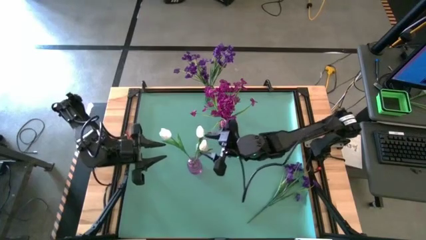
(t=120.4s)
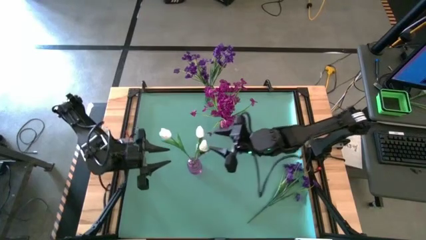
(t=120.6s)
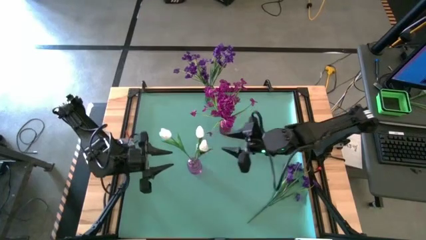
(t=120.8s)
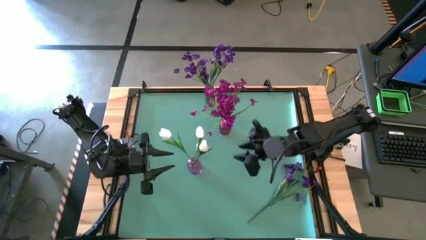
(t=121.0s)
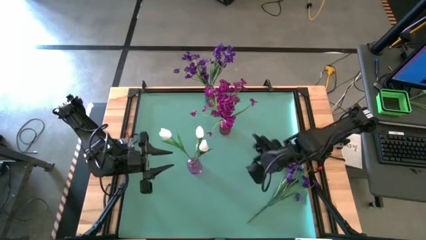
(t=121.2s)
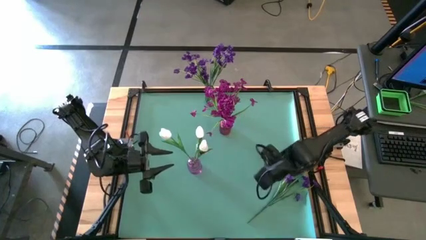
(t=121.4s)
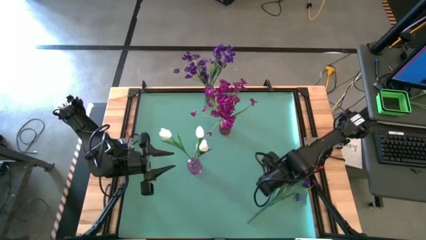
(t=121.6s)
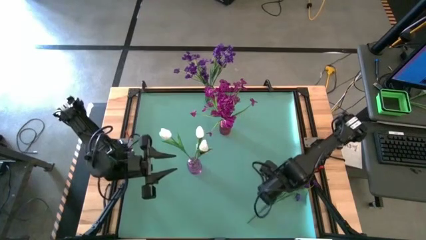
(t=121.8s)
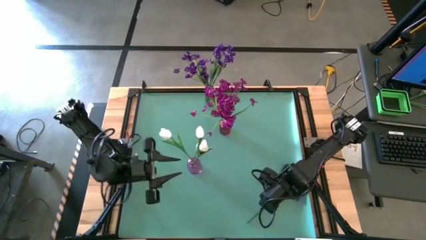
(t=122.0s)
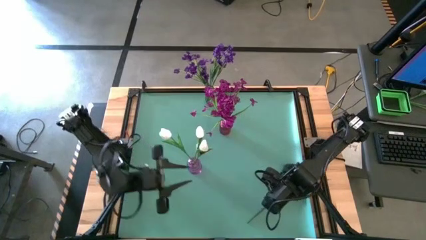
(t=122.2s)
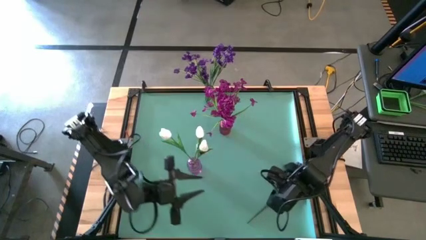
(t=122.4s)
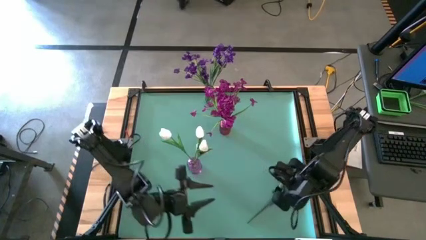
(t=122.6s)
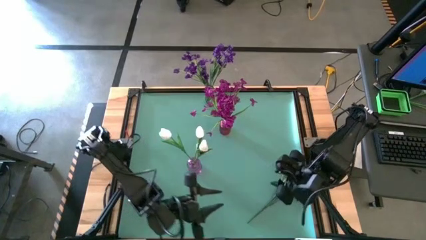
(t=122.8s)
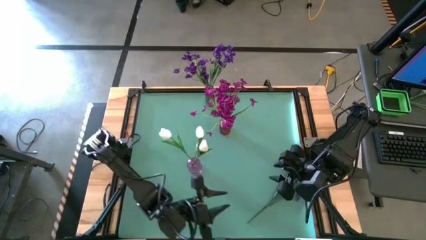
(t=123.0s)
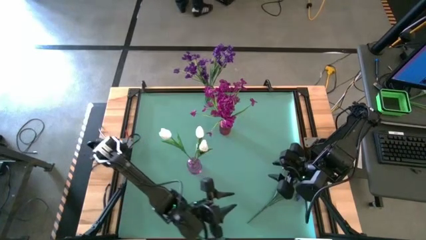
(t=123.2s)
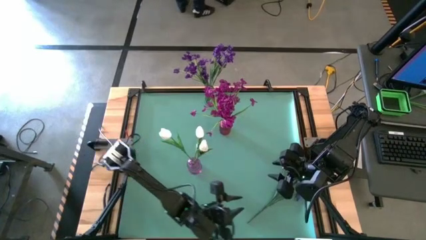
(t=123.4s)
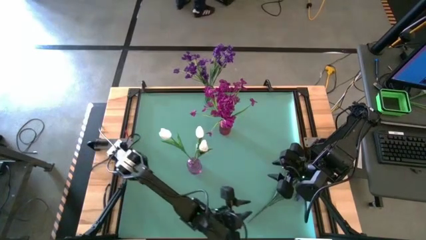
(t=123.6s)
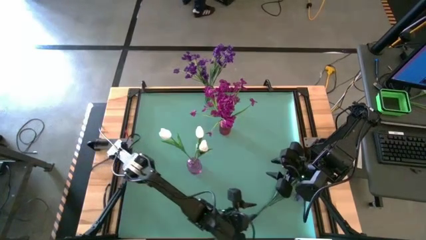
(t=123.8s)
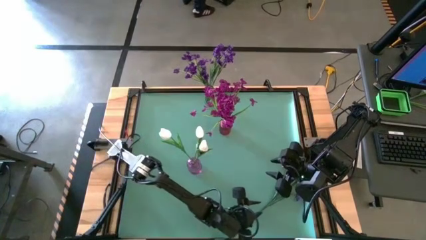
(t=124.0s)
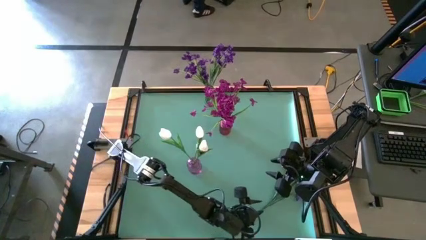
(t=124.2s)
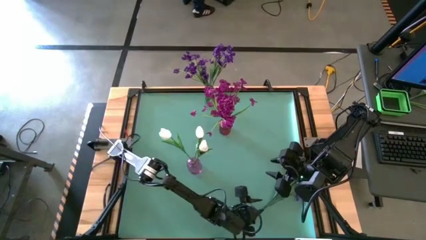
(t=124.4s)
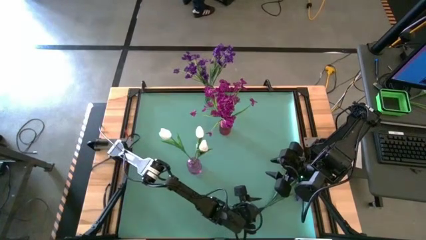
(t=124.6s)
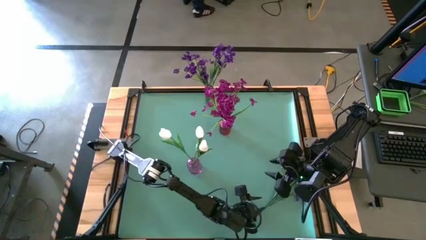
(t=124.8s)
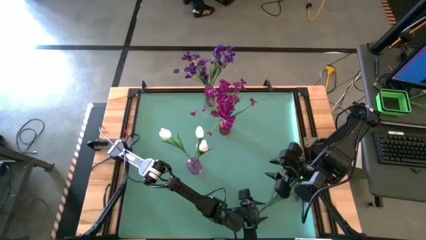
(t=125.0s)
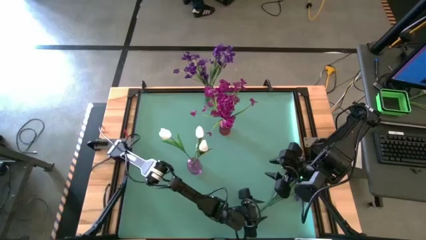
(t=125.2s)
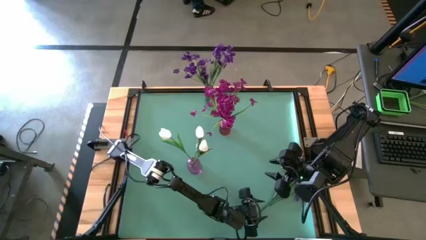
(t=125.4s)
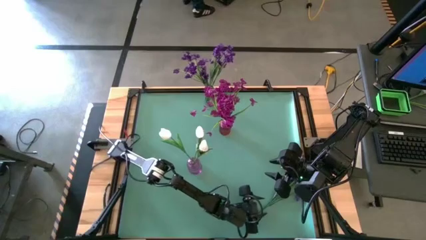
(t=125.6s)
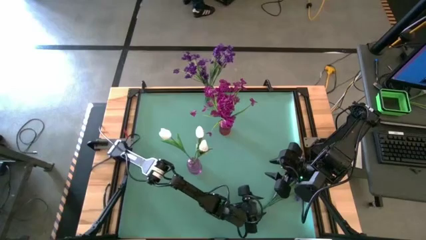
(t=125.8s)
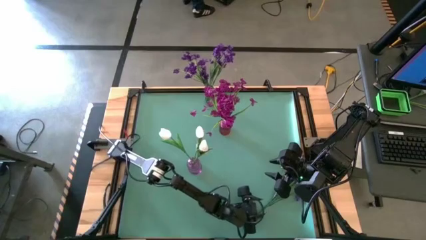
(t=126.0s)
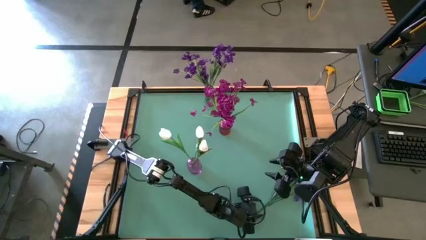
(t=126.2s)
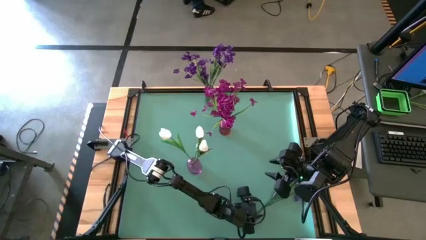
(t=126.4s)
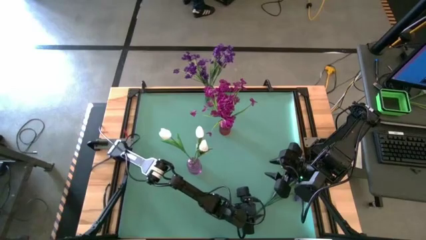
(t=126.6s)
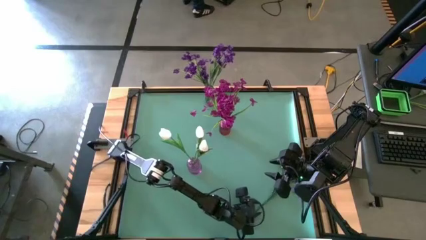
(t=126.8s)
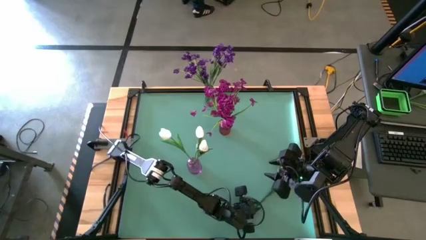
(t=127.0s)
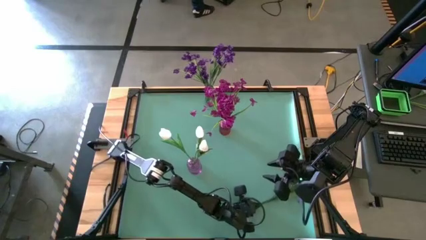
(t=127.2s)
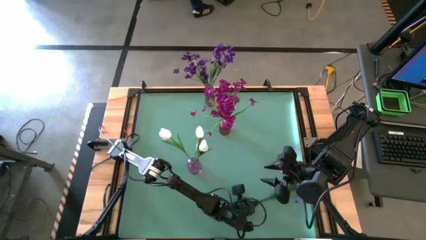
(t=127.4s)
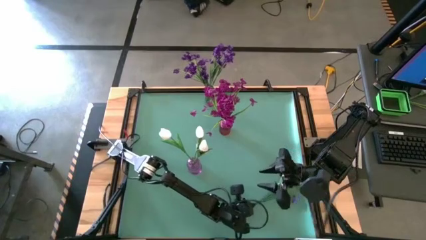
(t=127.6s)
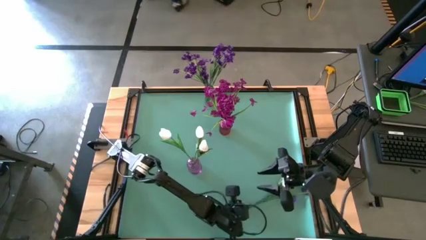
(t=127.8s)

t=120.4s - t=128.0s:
Task: Sort flowers into vase by color
Put the purple flower into the green vase

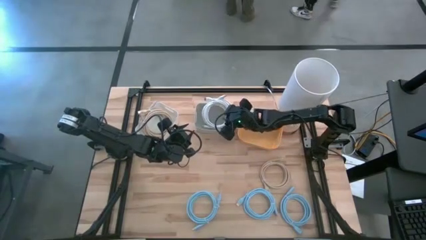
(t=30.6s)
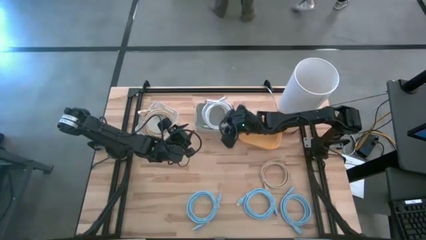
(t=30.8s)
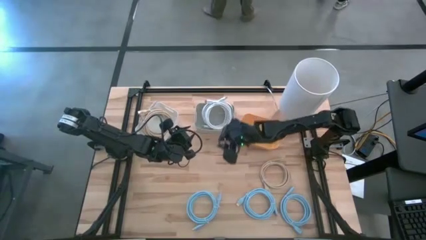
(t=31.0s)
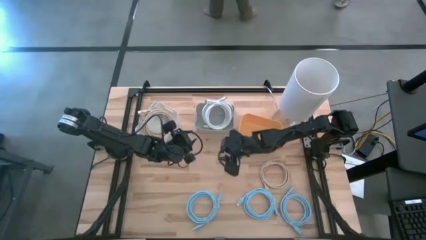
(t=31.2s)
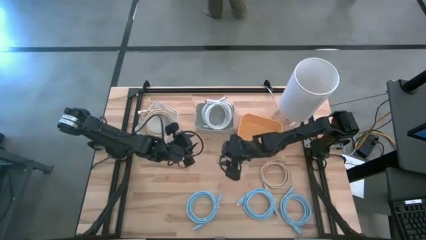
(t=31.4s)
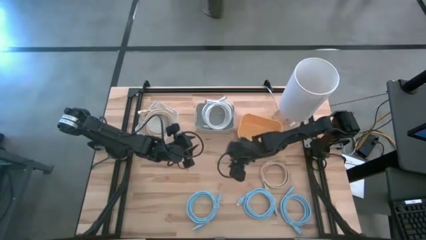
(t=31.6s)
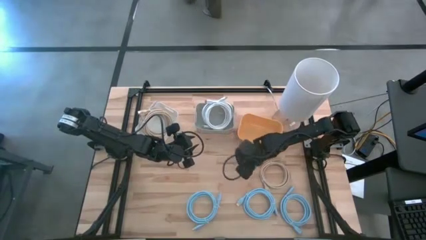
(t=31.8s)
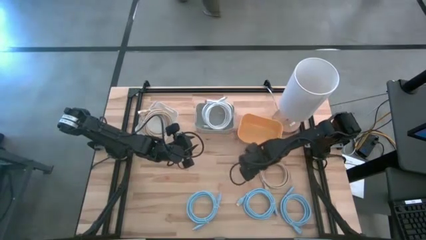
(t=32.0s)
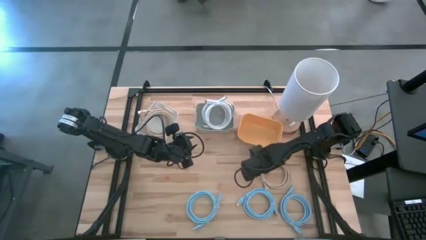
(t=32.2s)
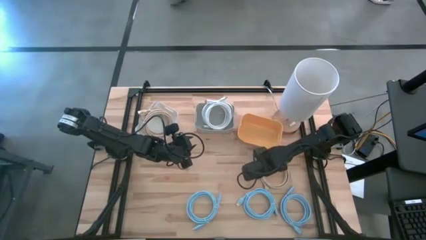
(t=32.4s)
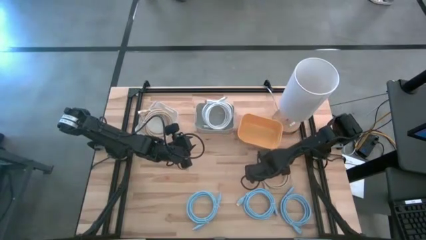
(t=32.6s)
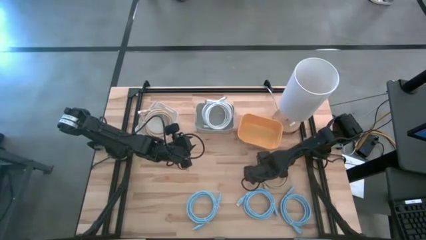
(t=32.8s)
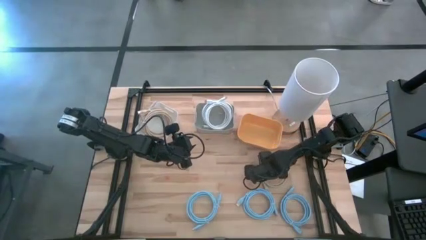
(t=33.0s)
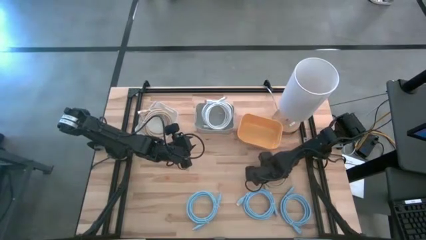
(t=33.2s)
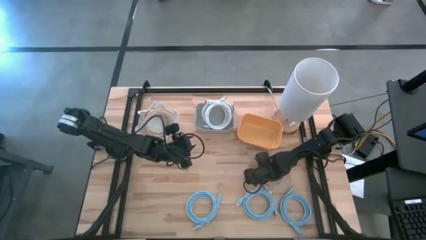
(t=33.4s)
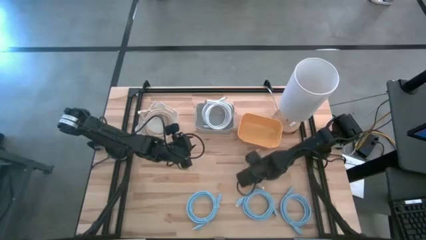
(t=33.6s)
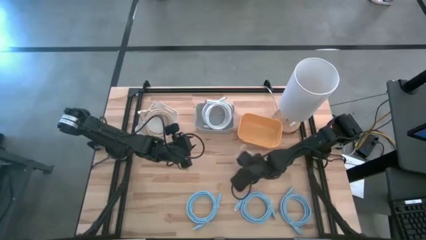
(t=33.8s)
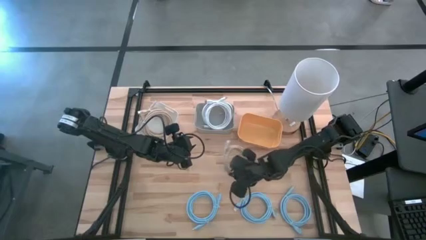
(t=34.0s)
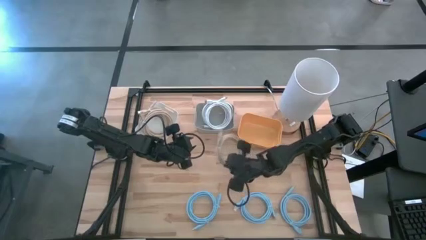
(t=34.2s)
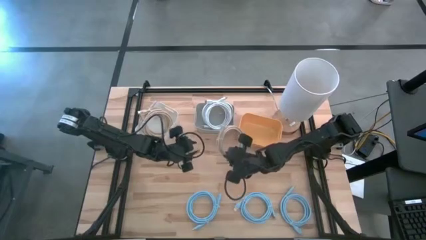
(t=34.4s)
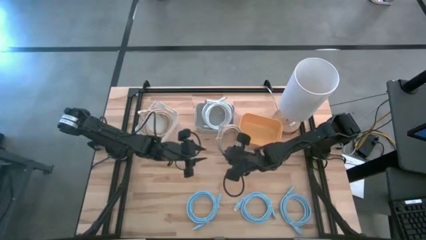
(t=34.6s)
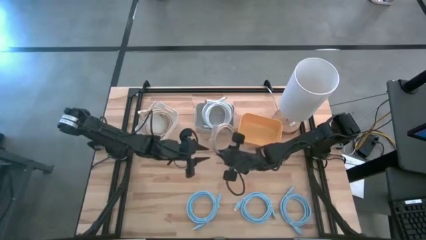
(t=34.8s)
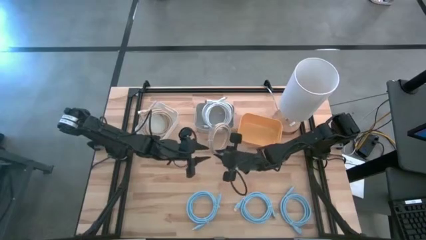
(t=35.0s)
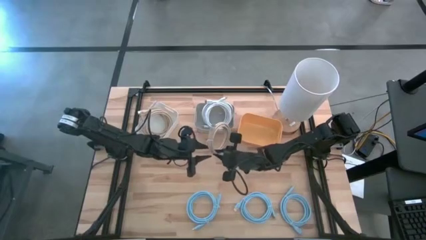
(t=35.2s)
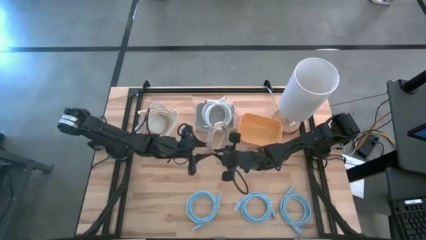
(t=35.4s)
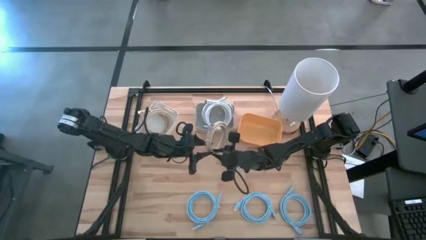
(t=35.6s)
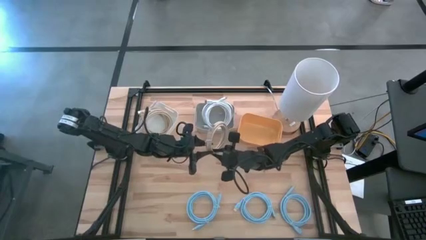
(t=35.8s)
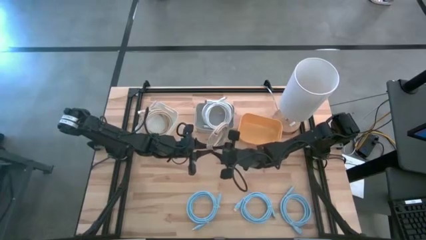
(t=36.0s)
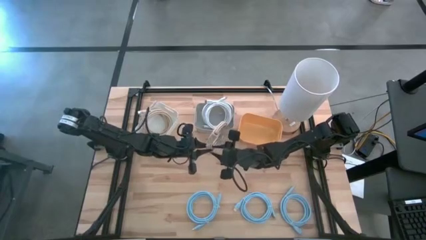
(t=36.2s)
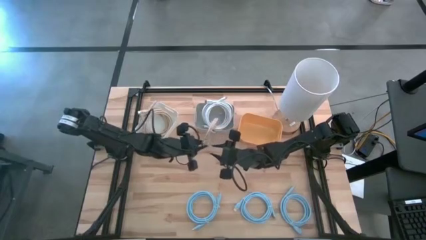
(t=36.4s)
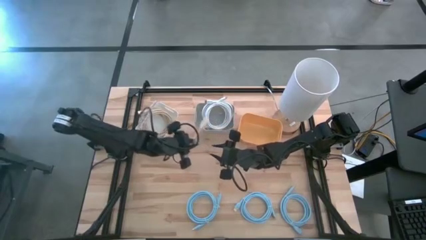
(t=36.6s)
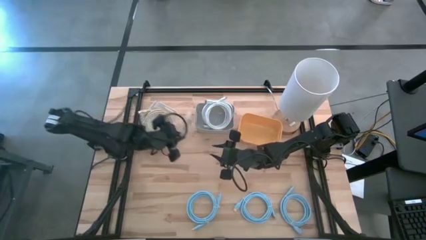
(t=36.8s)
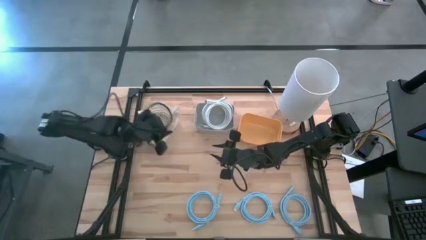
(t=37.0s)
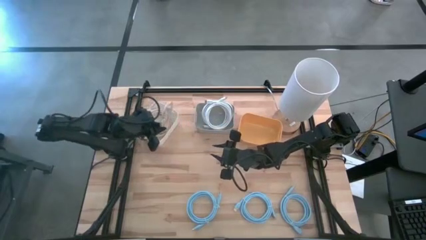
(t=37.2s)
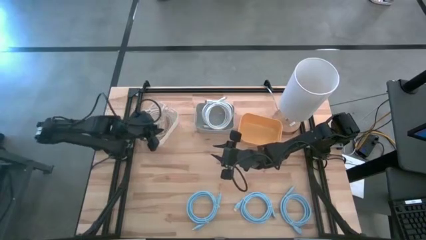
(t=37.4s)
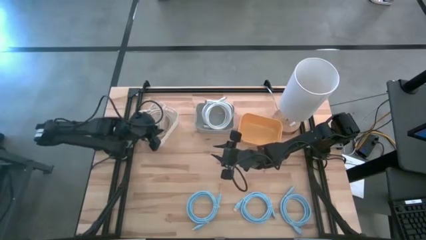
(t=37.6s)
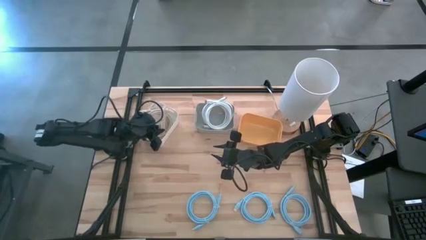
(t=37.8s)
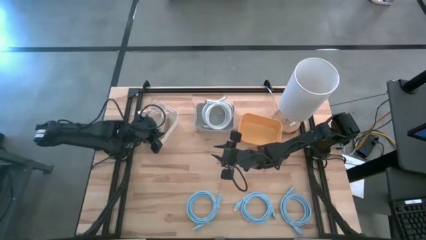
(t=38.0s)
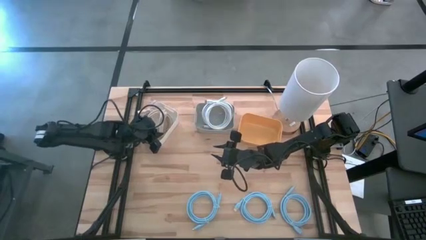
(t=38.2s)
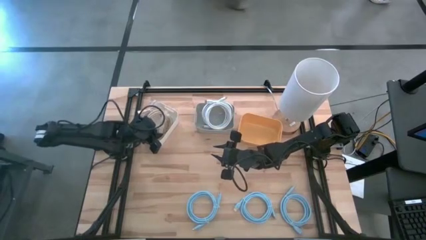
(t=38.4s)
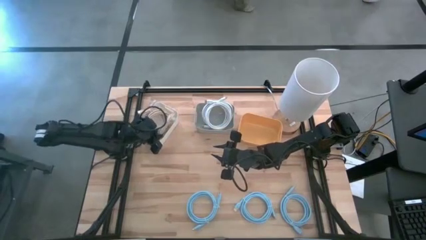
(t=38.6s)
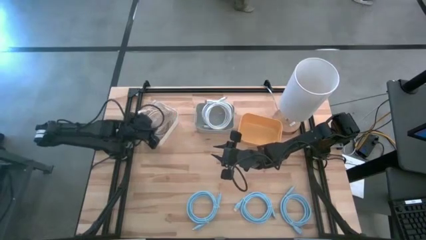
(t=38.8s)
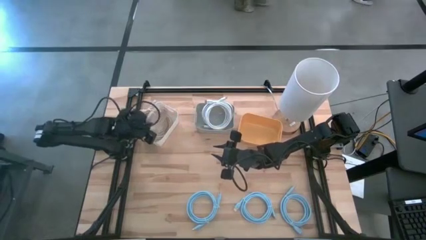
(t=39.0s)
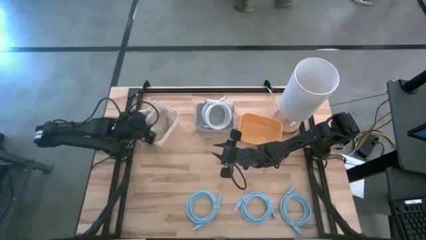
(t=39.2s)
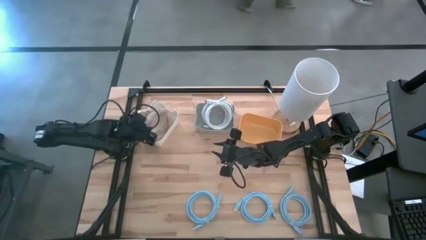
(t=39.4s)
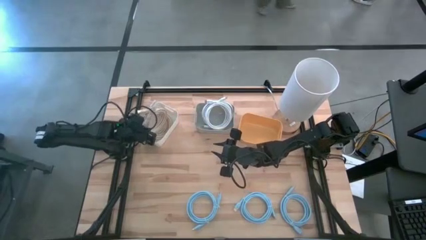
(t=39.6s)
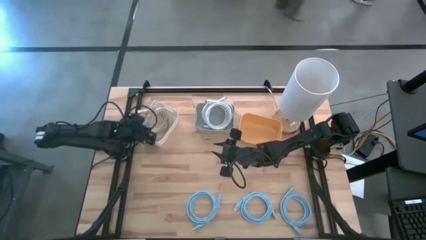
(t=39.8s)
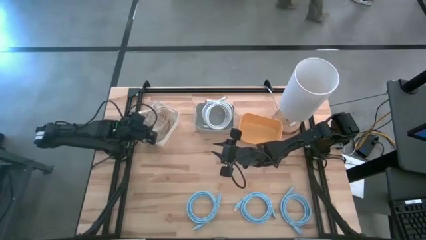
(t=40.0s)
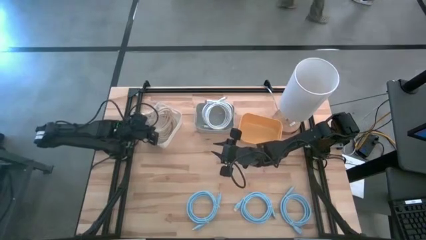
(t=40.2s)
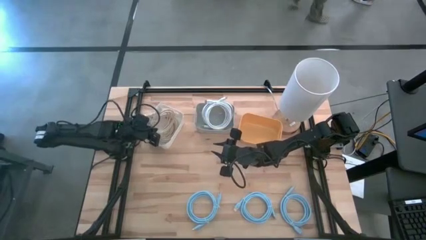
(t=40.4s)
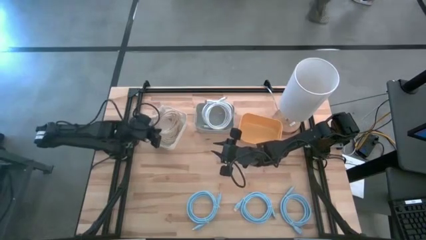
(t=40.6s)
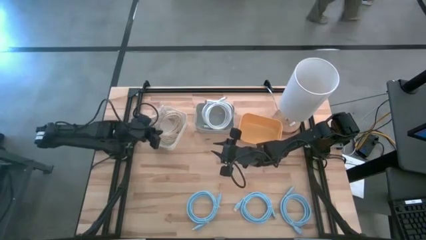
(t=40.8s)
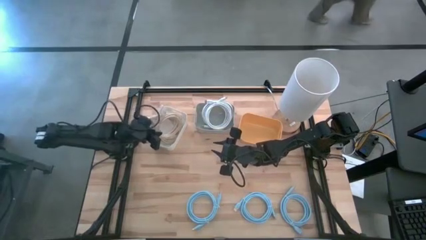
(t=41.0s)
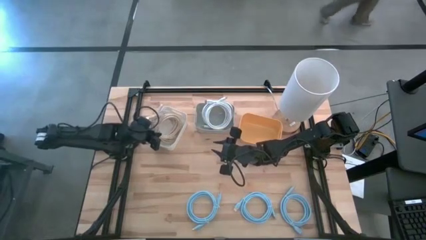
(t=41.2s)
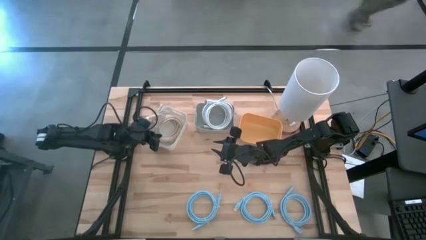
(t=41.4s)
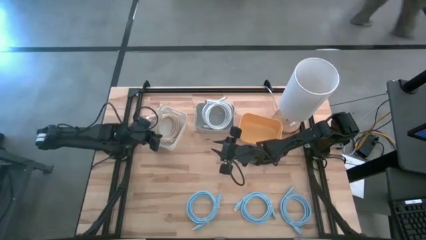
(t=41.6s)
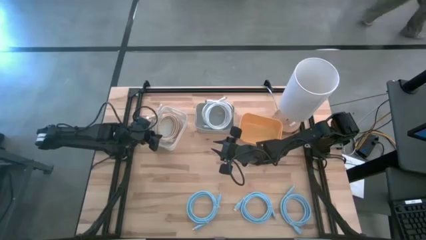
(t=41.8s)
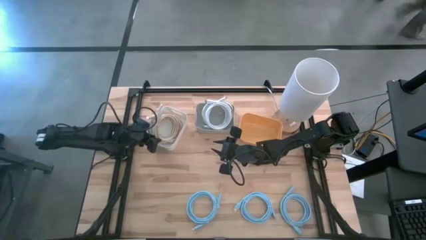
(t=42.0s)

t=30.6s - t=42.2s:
Task: Sort HDMI cables
Put the brown HDMI cable into the white bin
